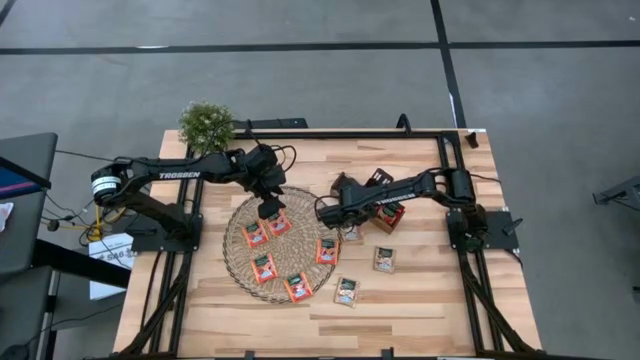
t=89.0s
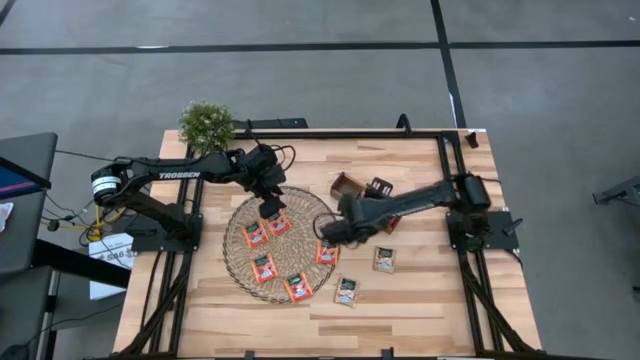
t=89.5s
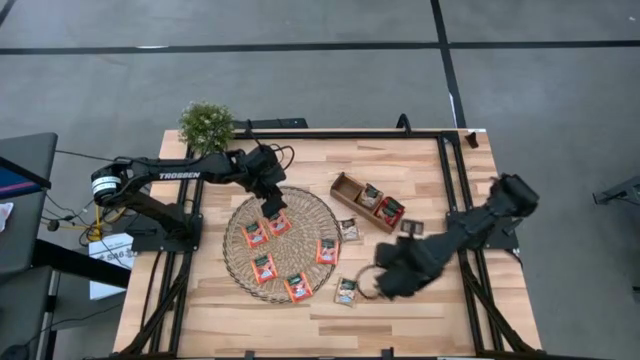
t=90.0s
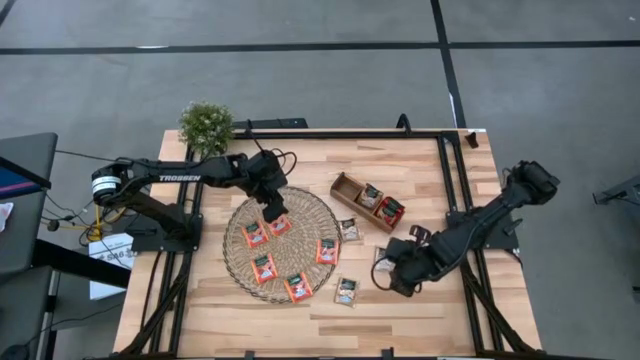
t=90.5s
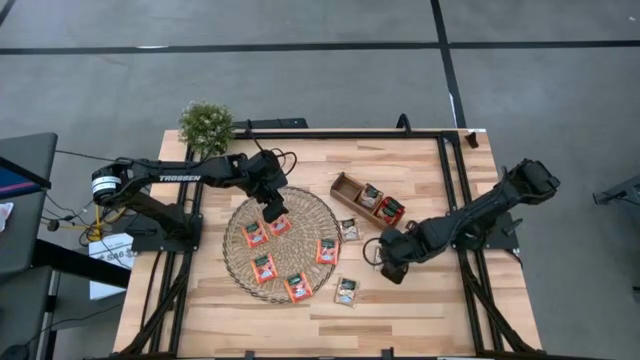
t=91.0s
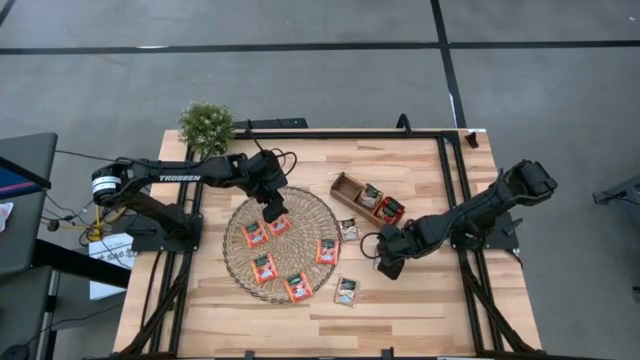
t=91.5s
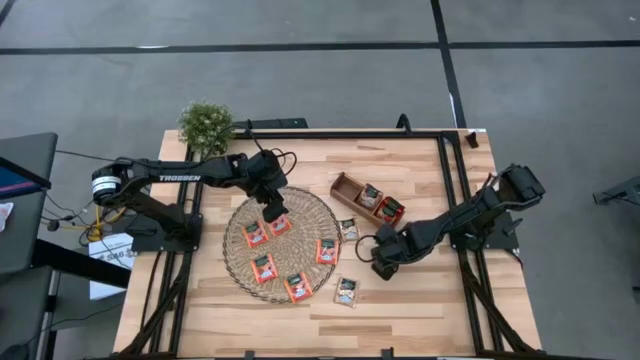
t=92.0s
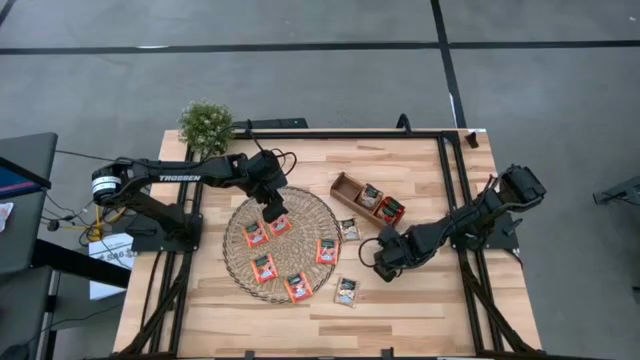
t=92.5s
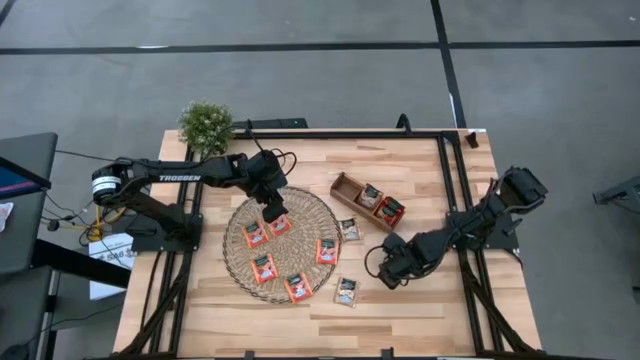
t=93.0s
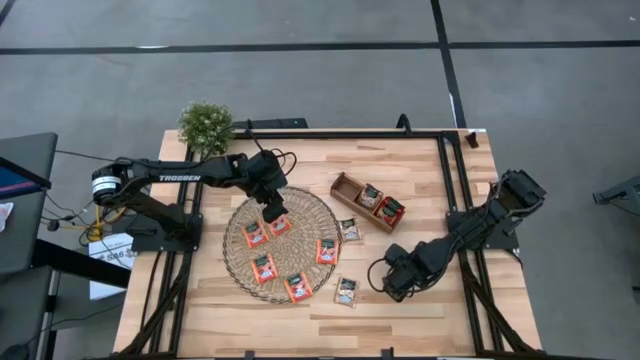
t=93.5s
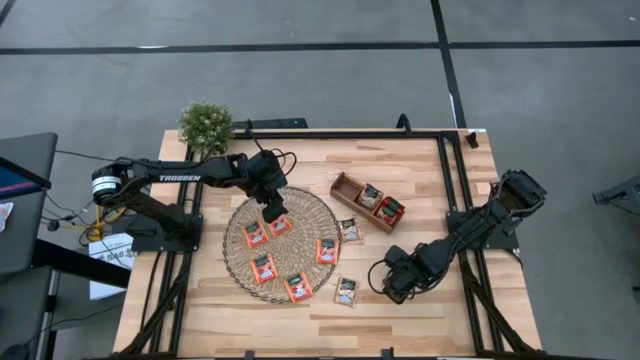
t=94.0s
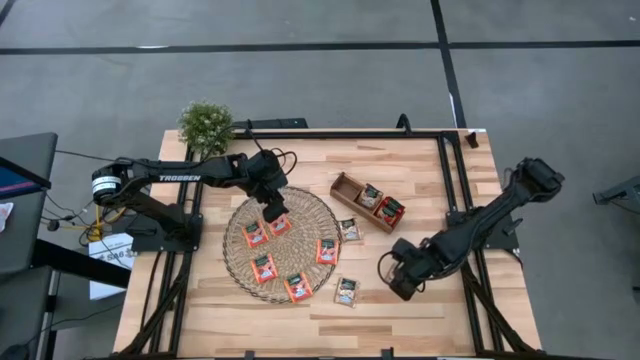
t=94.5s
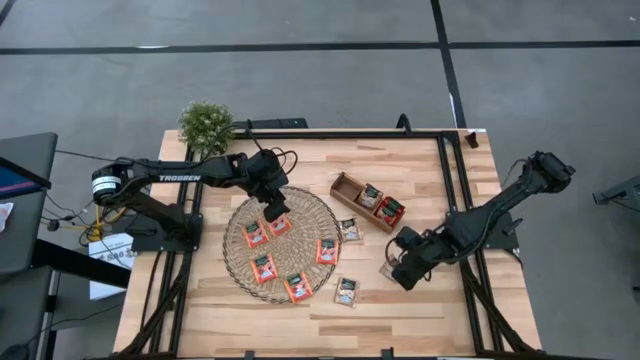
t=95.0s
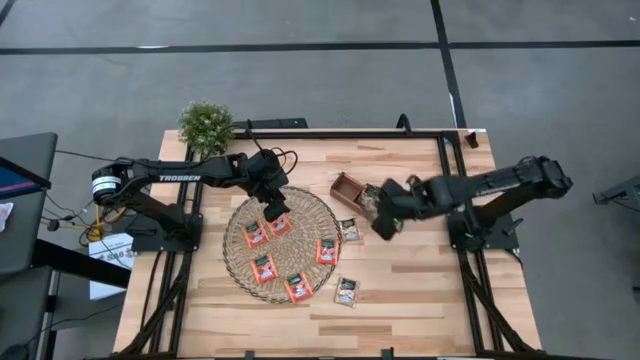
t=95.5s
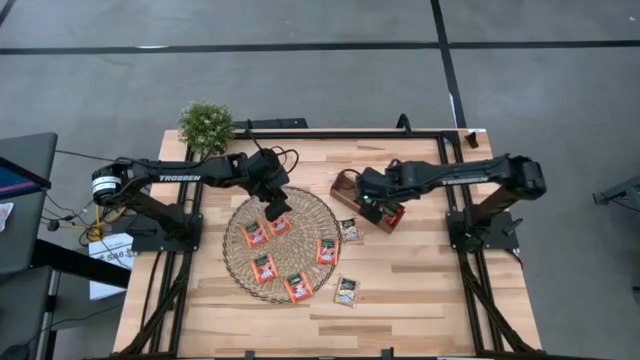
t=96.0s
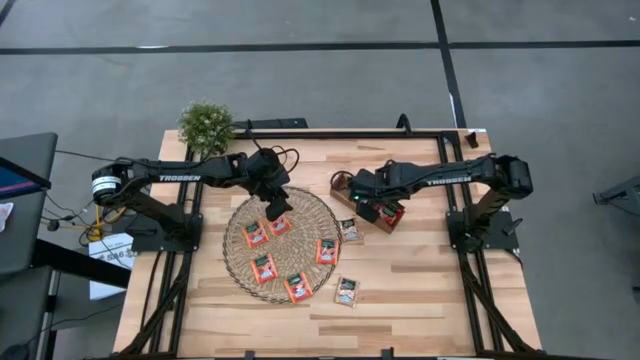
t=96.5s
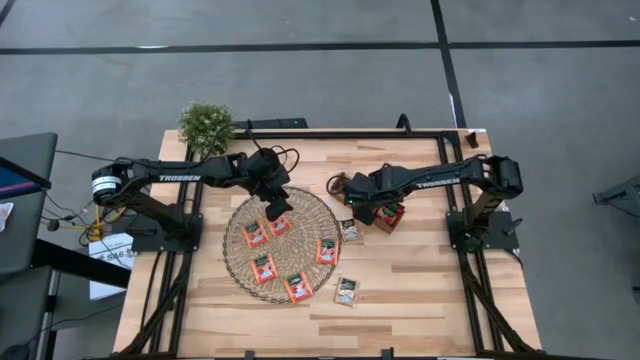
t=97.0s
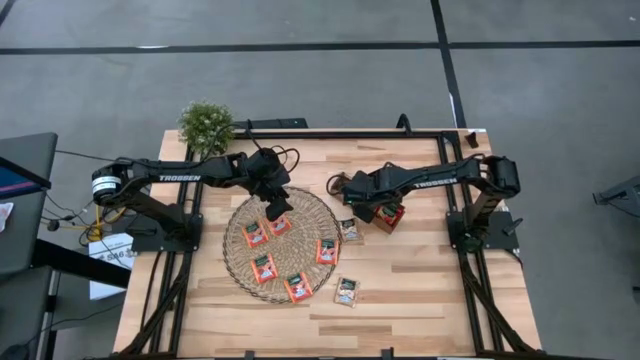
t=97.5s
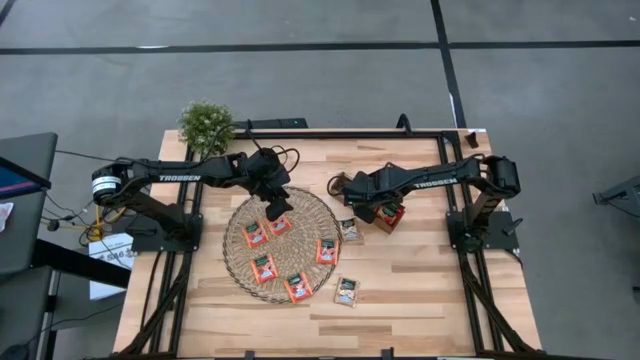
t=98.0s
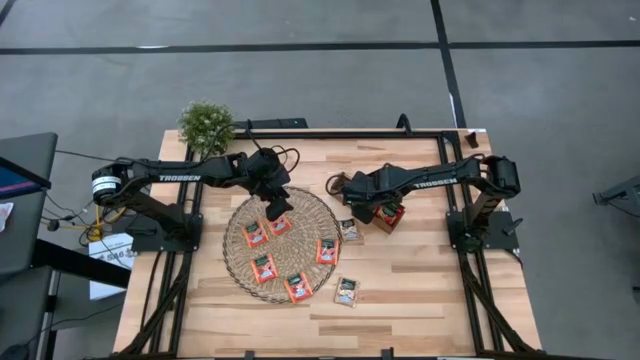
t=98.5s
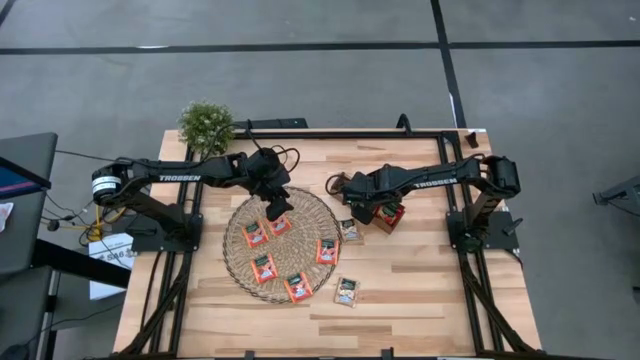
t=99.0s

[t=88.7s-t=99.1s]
Task: Pick & Place Tea
Put the brown tea bag into the middle section of the wooden organizer

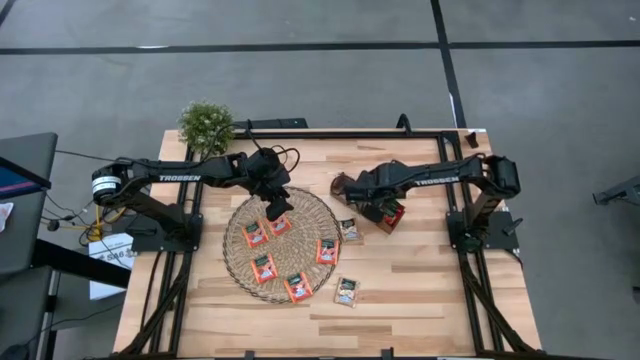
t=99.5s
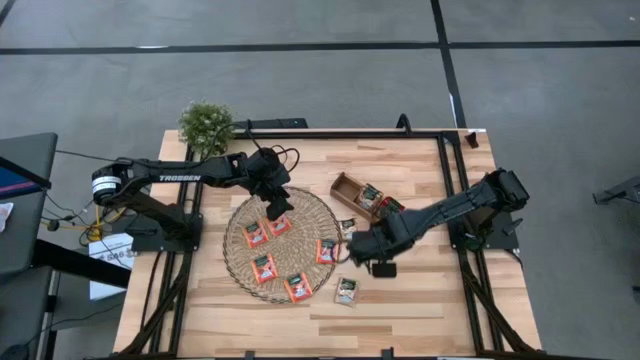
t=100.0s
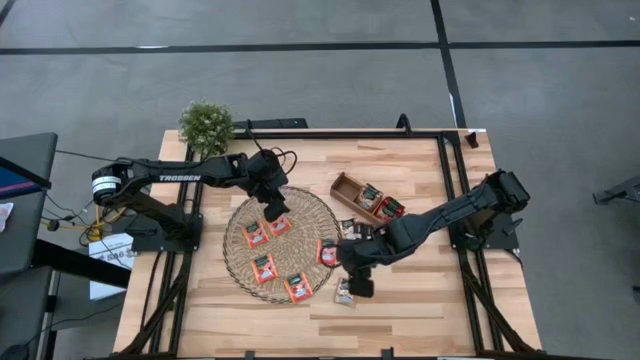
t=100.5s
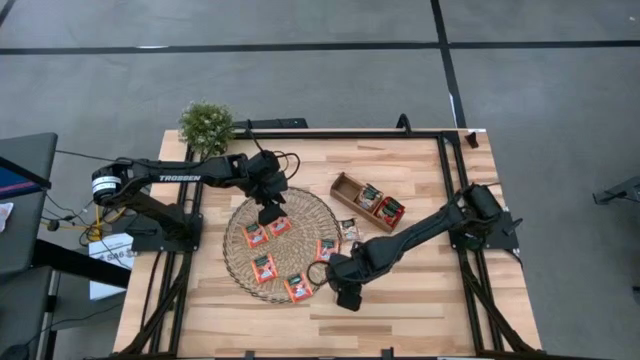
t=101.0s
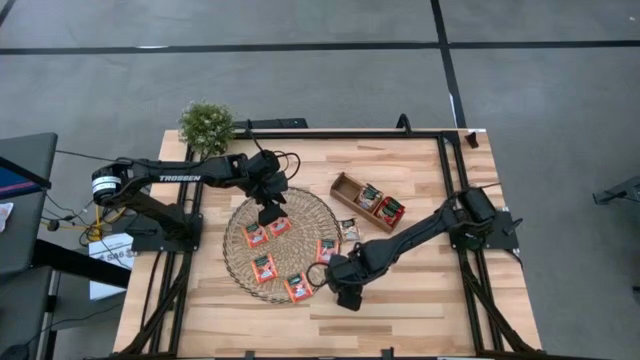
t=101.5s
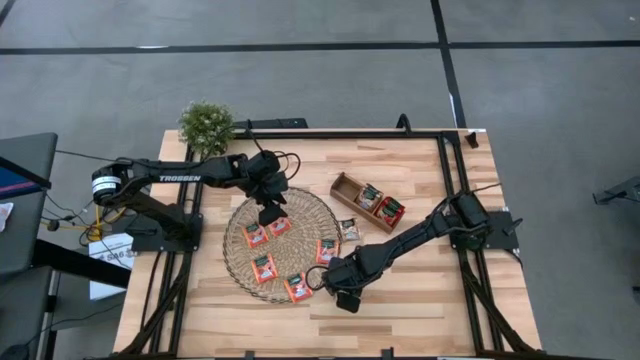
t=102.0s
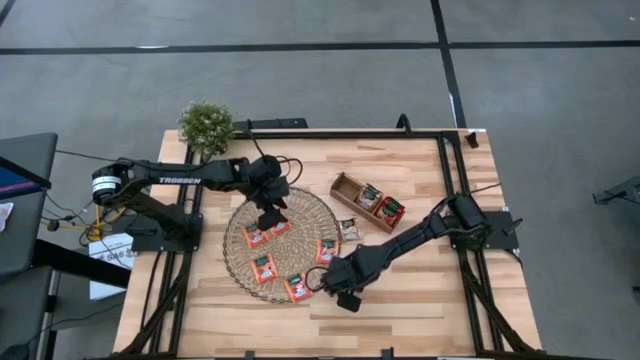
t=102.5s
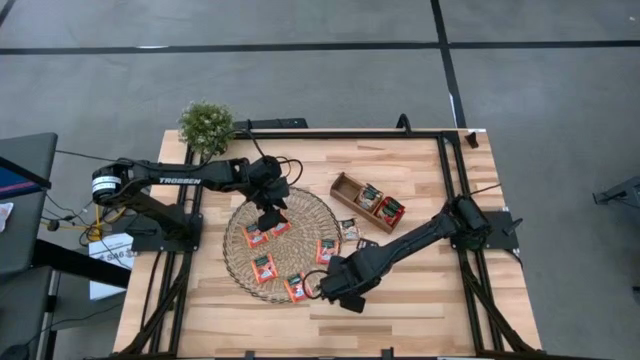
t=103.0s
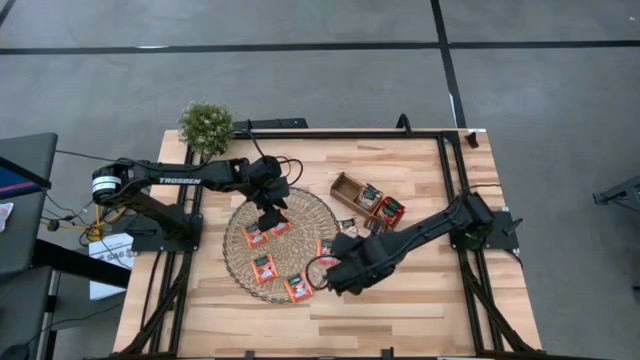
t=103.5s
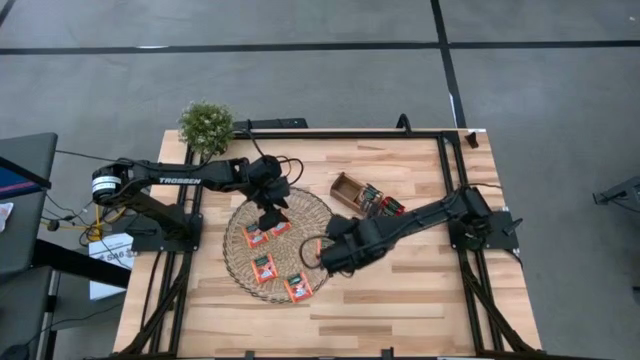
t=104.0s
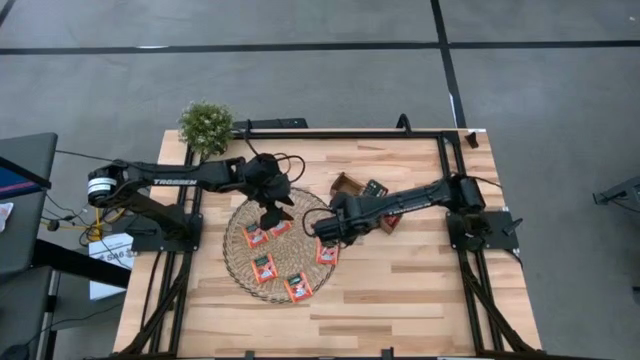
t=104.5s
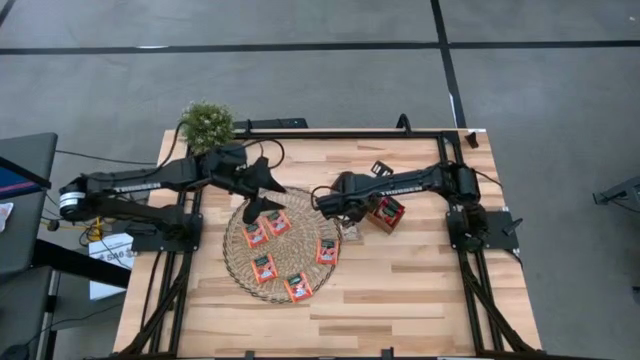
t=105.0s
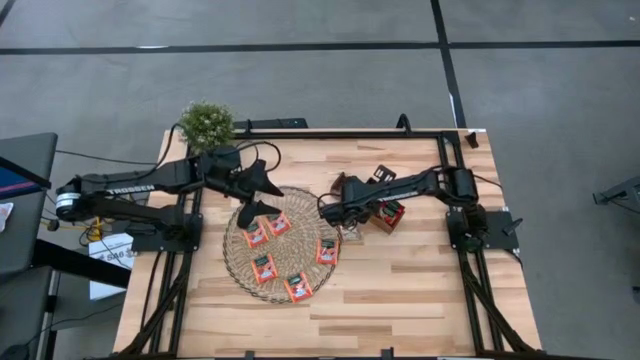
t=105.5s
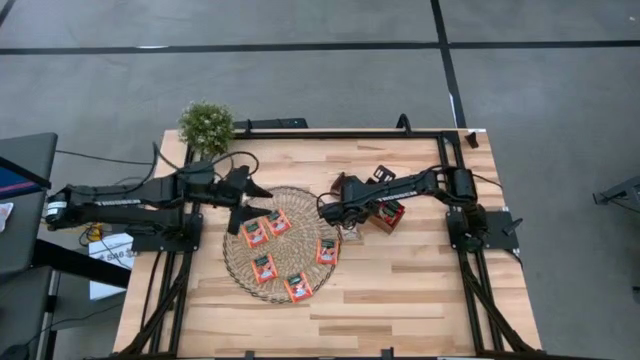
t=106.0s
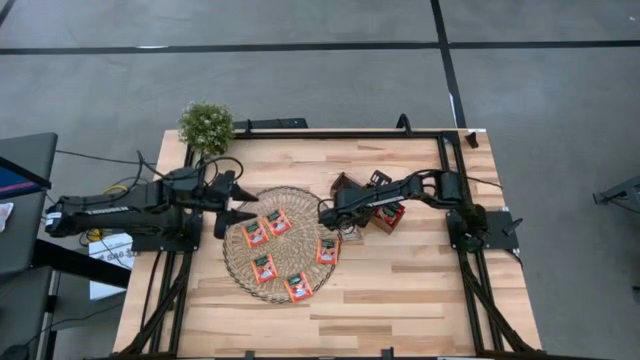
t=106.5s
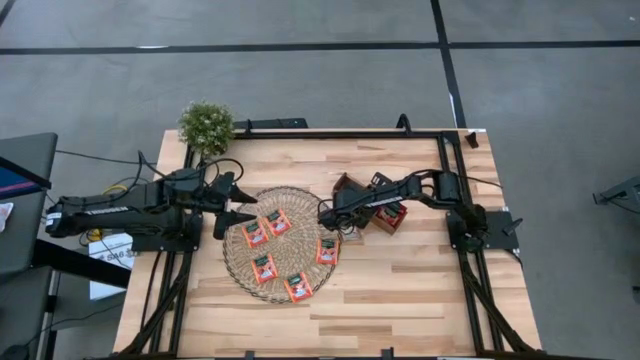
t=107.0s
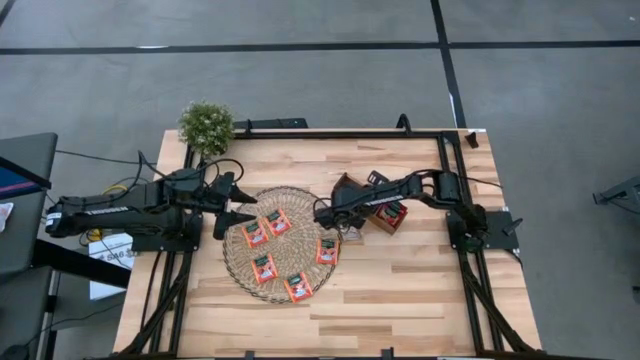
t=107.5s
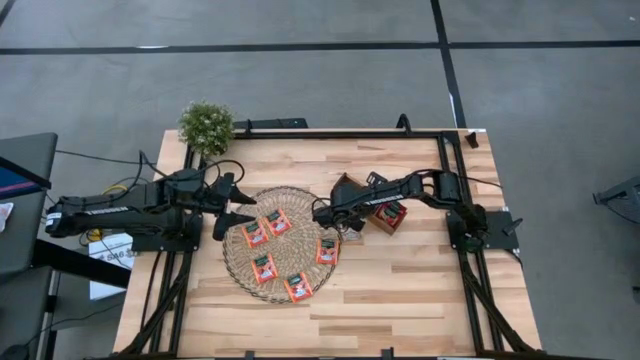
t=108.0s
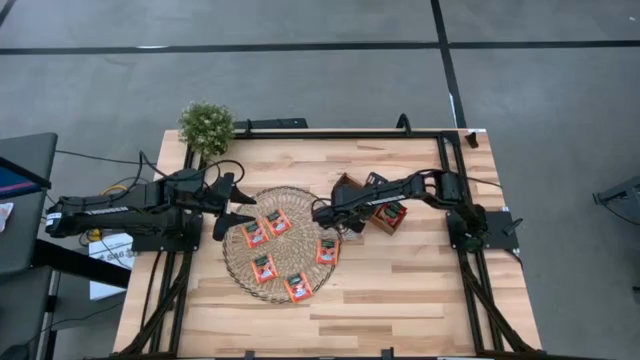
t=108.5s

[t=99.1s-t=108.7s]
Put the brown tea bag into the middle section of the wooden organizer

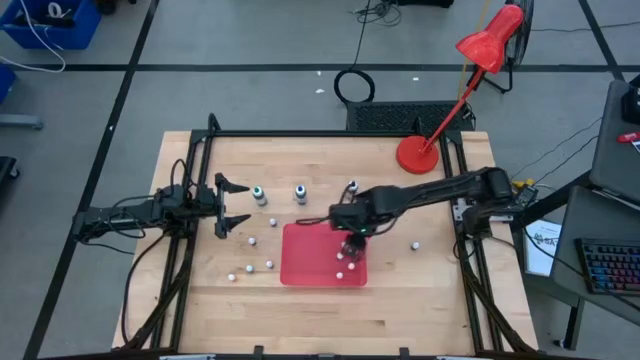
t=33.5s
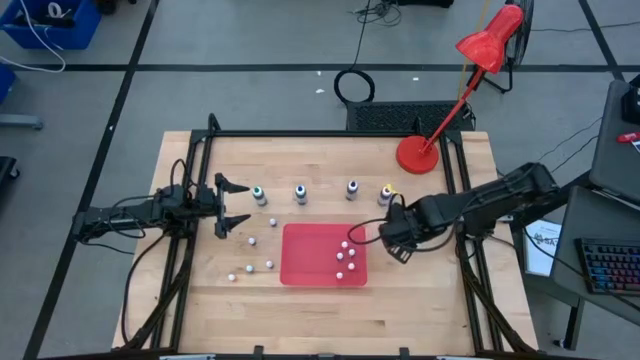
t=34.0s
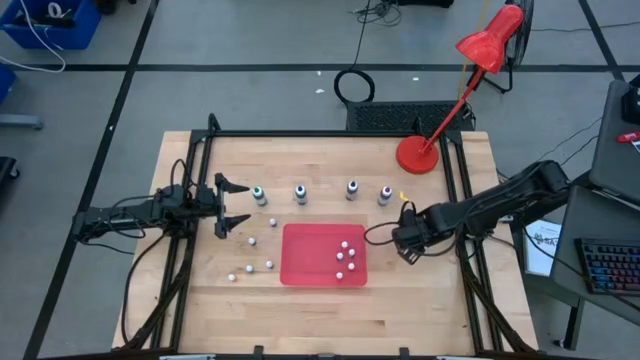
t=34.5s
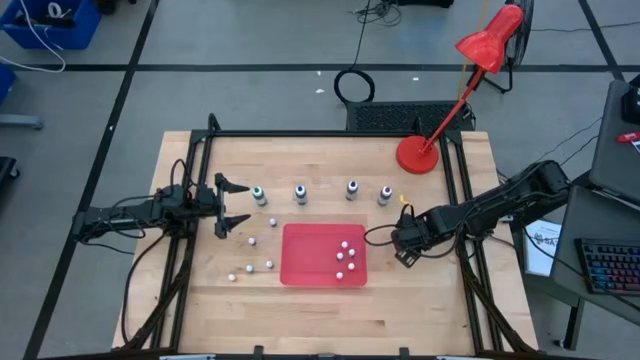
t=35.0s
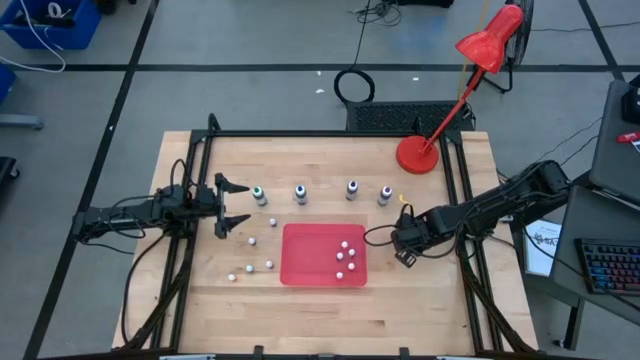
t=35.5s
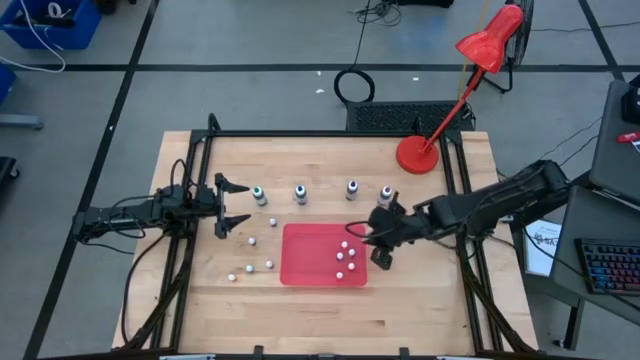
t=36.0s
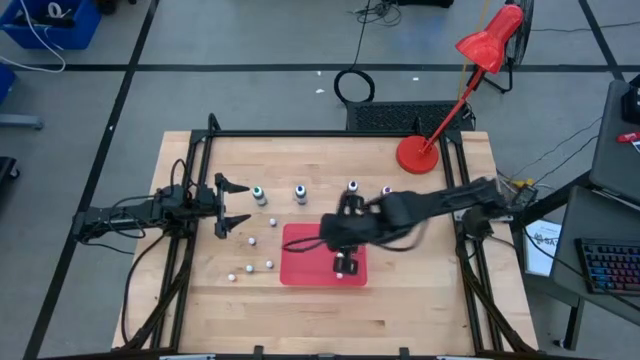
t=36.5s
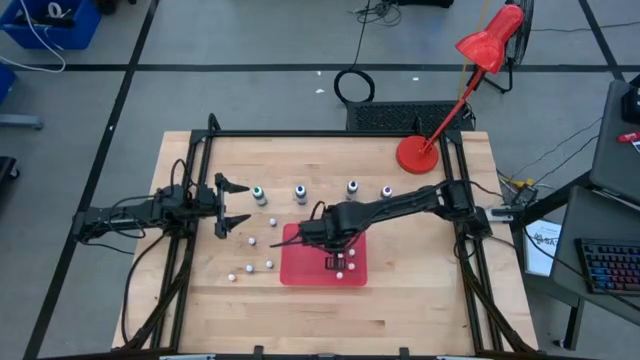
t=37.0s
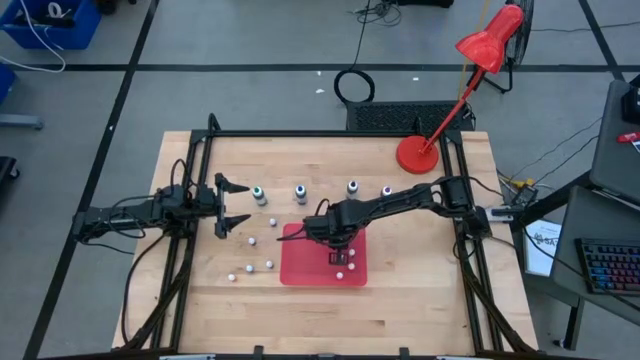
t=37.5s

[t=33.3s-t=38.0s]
Task: Pick & Place food coloring
Put the small black food coloring bottle into the pink bin
